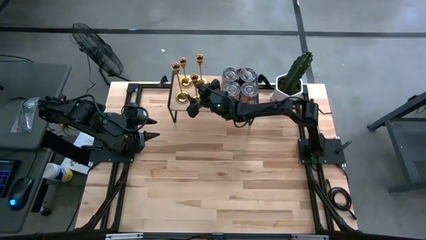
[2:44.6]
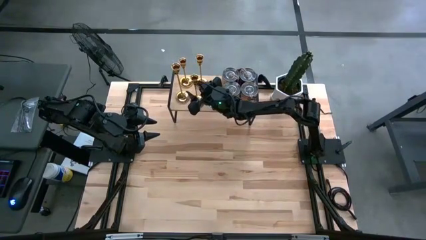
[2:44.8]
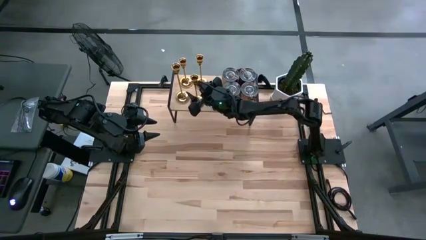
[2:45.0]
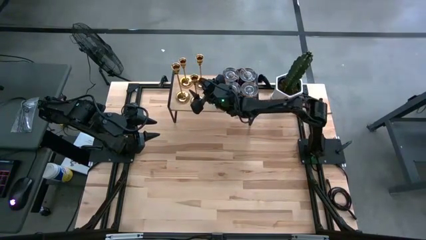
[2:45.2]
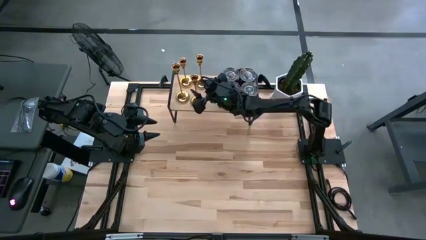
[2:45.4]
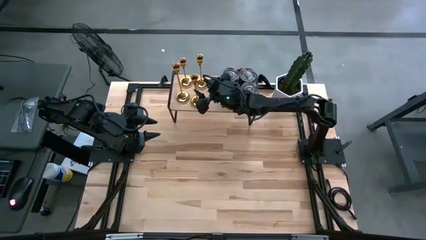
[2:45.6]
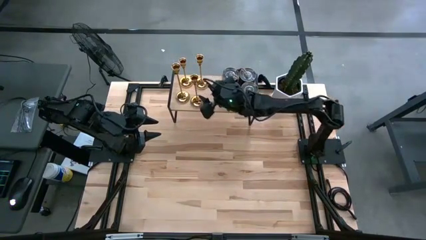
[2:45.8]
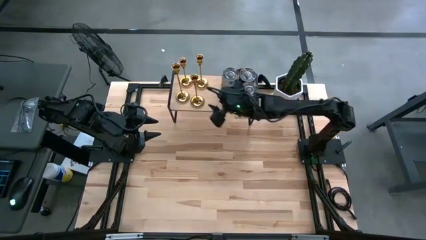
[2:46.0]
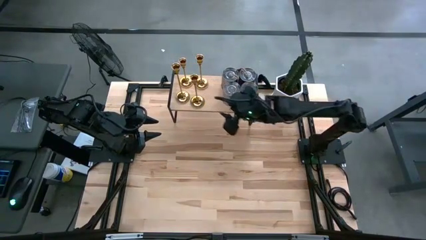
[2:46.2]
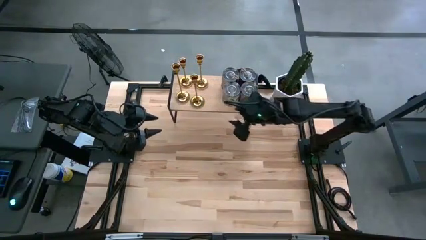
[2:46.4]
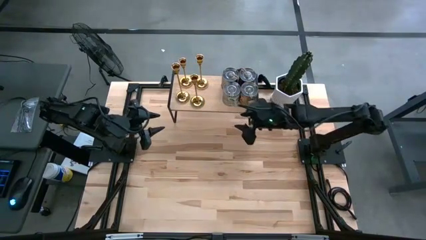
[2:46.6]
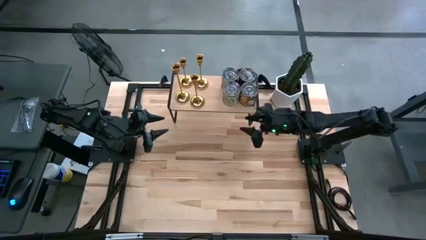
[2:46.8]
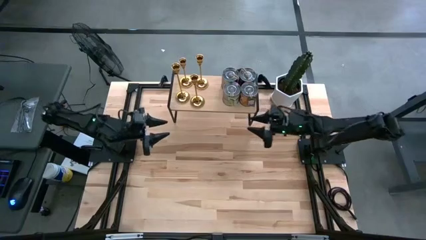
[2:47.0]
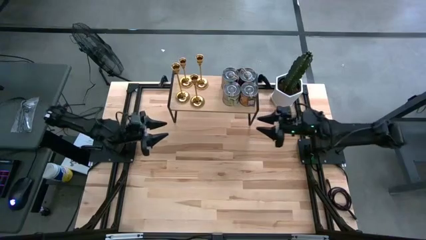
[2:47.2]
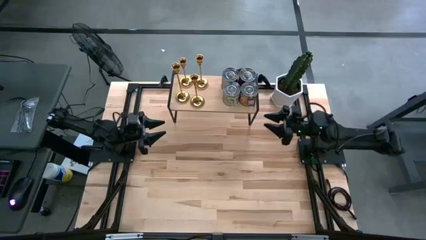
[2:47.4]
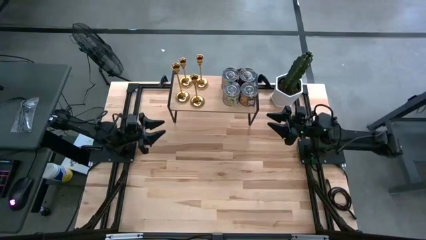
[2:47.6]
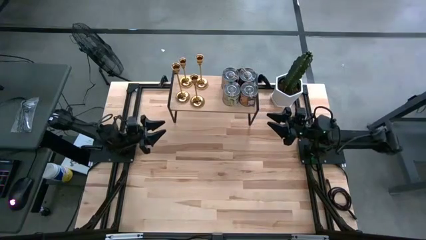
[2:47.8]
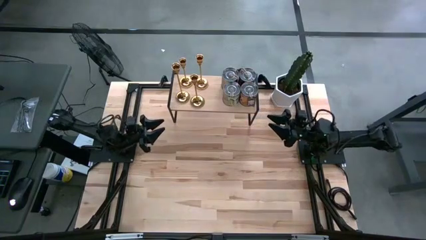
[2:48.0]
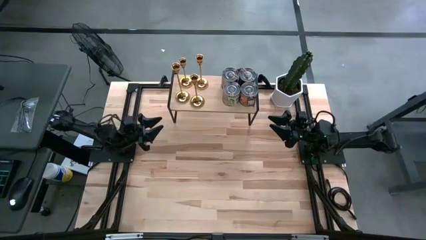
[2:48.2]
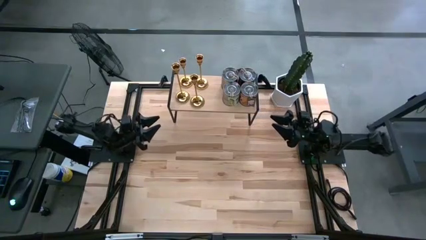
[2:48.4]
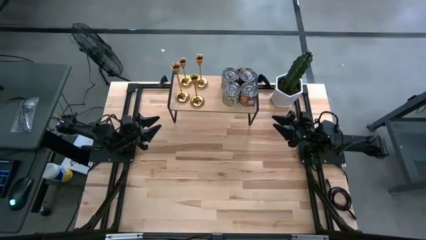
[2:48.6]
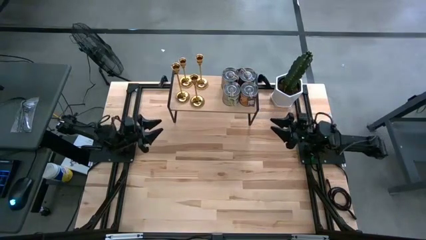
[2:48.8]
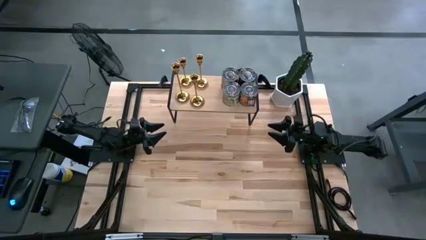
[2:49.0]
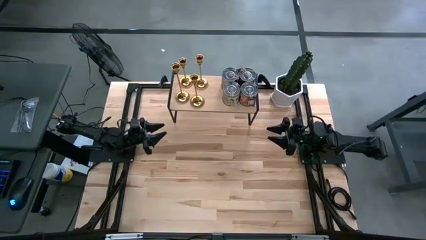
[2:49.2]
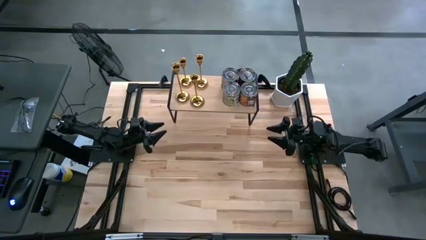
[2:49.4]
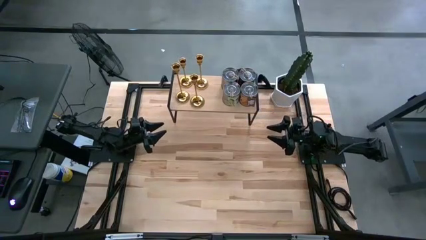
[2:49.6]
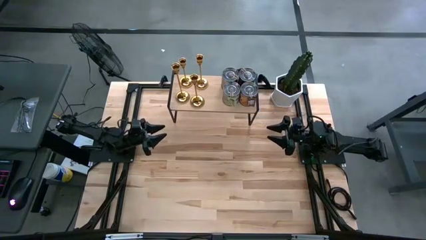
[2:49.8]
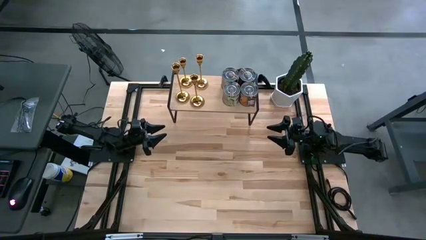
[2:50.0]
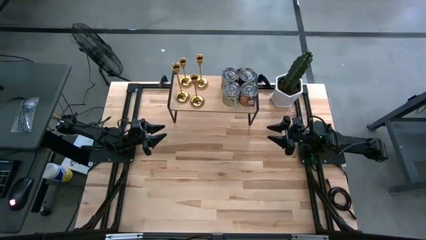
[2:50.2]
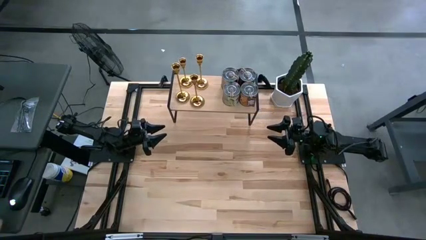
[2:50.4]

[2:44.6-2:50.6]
Task: Pick & Place candle stick holders
Return to Home Position

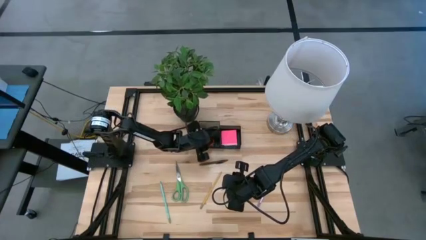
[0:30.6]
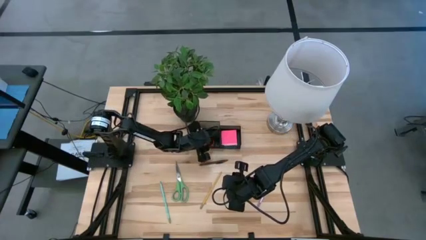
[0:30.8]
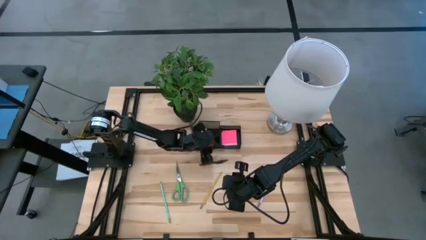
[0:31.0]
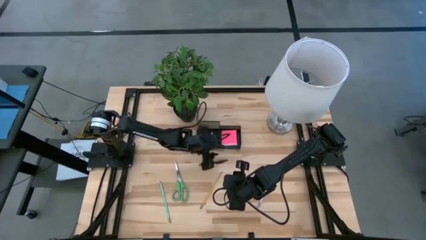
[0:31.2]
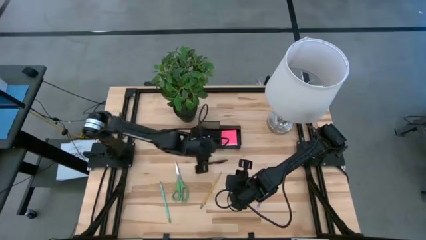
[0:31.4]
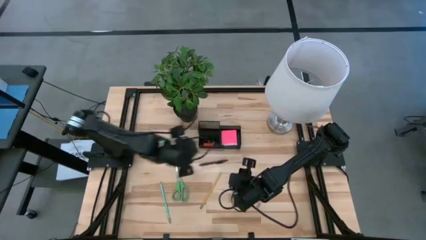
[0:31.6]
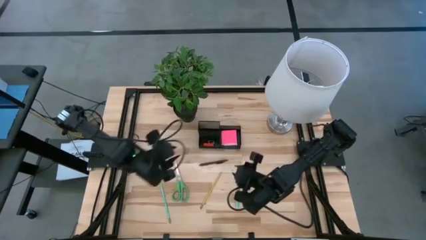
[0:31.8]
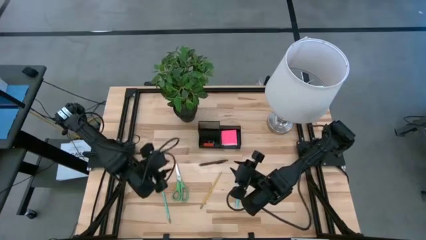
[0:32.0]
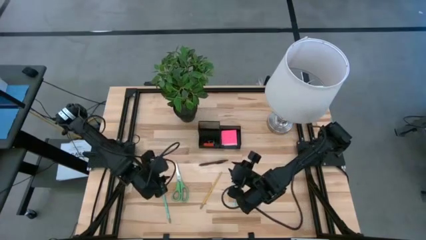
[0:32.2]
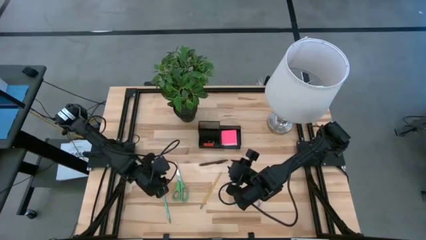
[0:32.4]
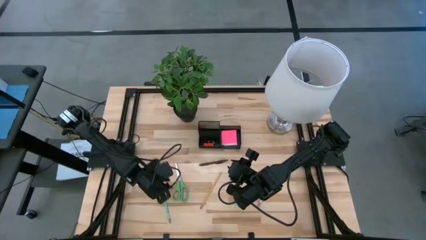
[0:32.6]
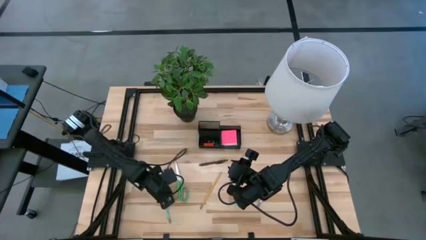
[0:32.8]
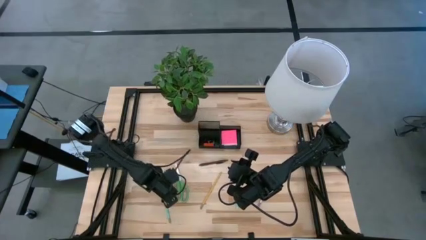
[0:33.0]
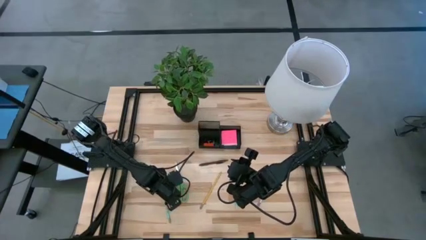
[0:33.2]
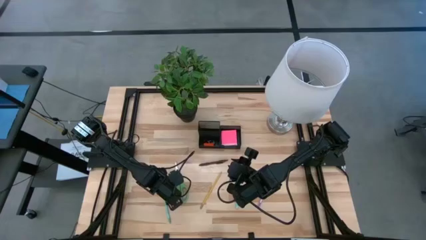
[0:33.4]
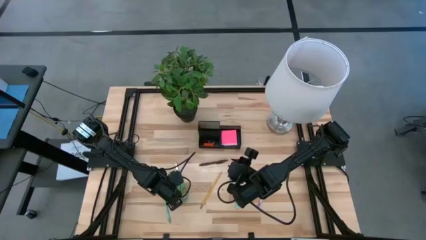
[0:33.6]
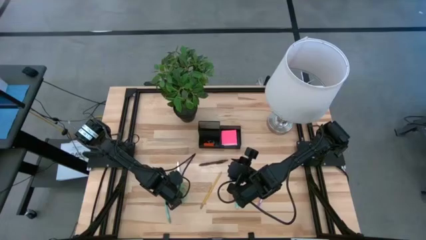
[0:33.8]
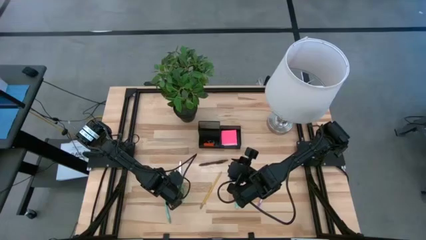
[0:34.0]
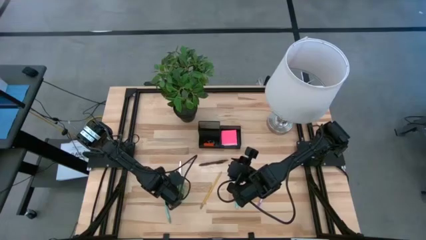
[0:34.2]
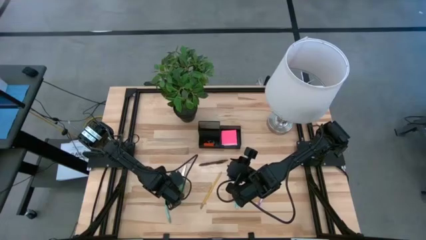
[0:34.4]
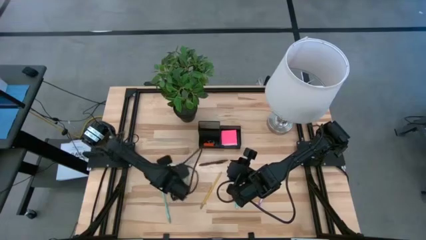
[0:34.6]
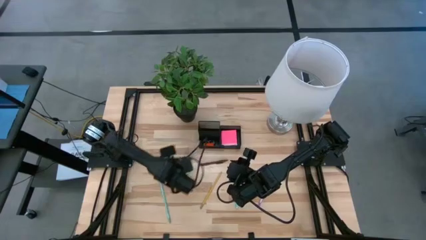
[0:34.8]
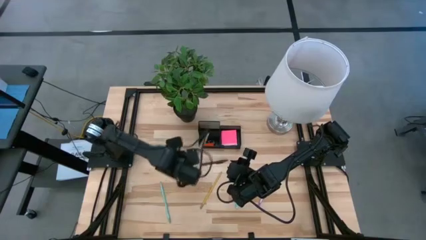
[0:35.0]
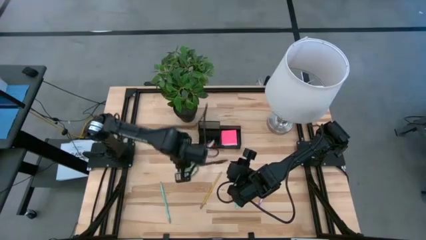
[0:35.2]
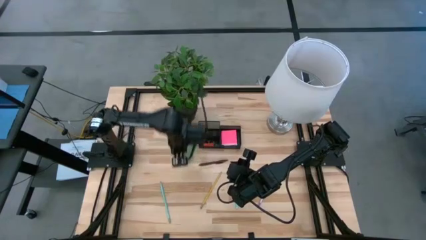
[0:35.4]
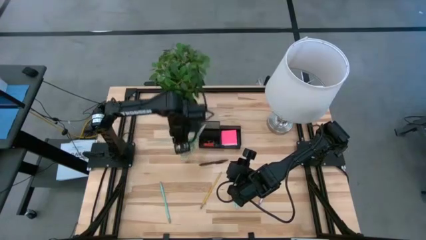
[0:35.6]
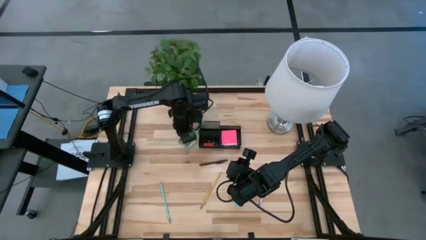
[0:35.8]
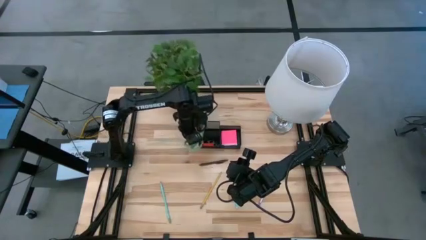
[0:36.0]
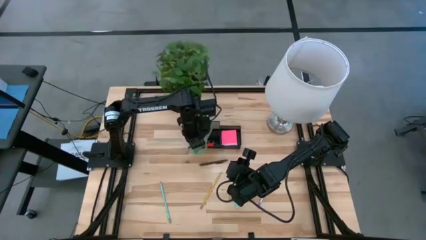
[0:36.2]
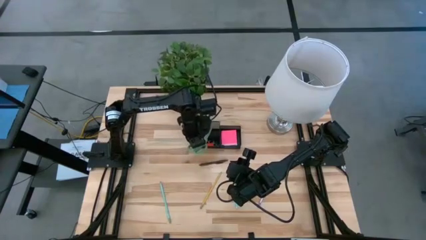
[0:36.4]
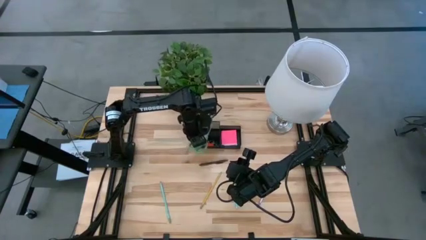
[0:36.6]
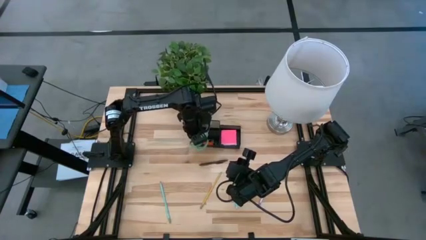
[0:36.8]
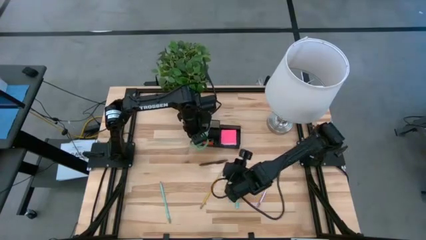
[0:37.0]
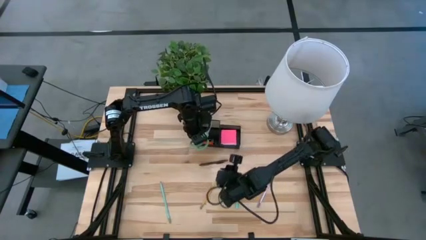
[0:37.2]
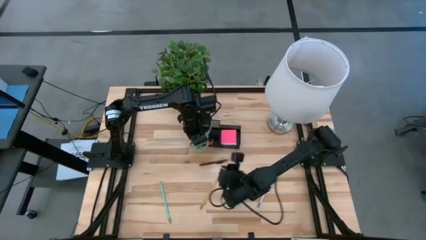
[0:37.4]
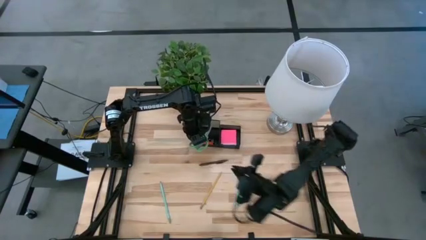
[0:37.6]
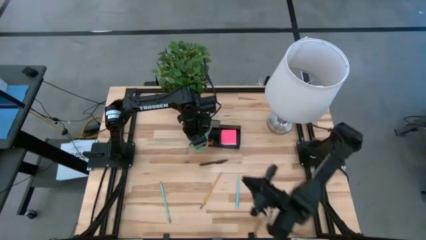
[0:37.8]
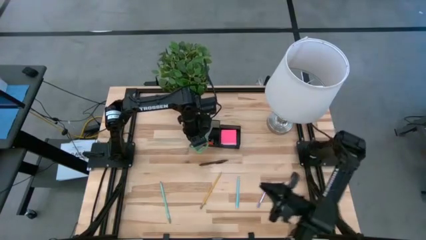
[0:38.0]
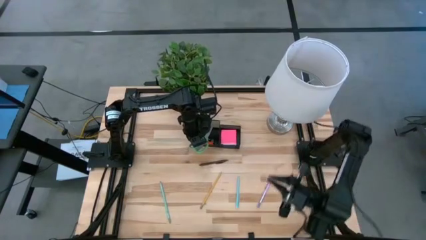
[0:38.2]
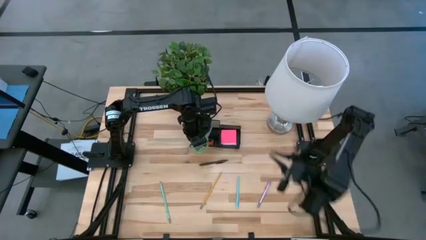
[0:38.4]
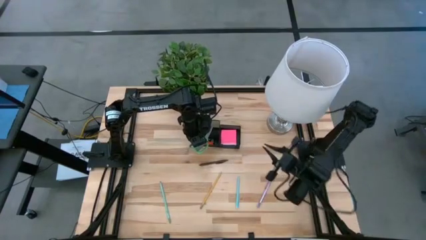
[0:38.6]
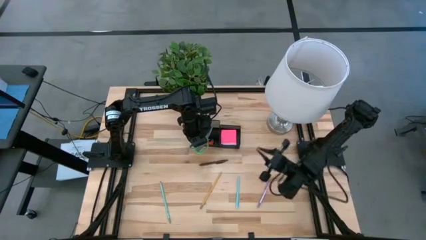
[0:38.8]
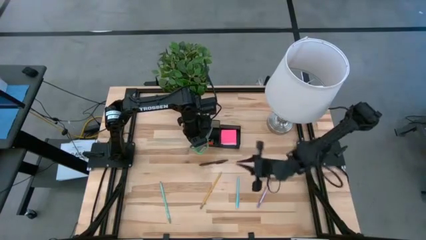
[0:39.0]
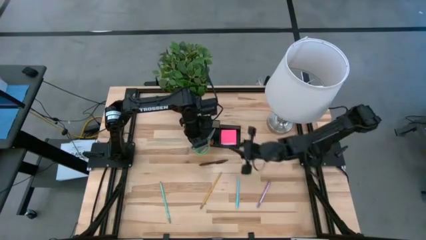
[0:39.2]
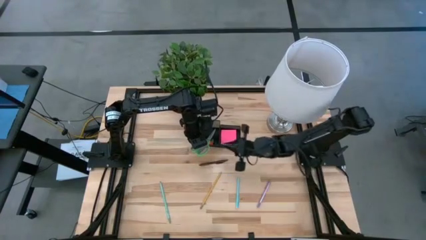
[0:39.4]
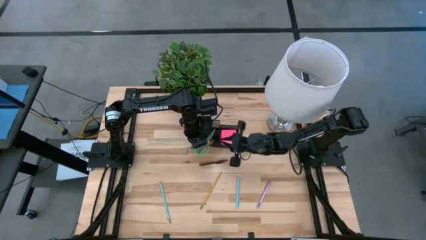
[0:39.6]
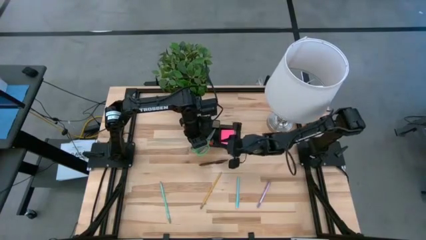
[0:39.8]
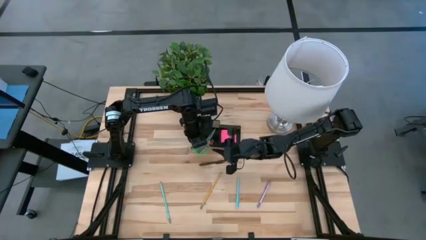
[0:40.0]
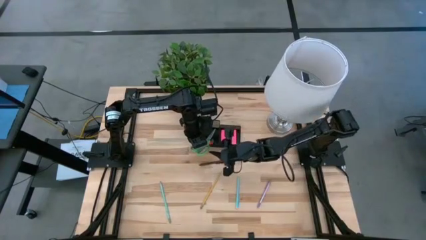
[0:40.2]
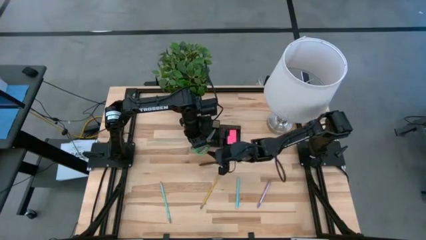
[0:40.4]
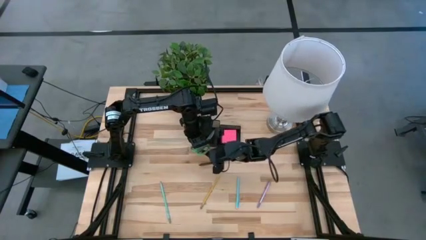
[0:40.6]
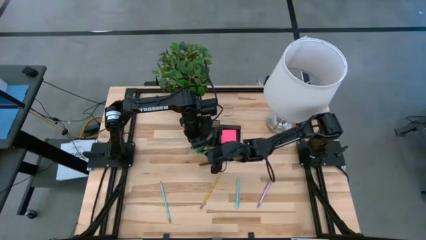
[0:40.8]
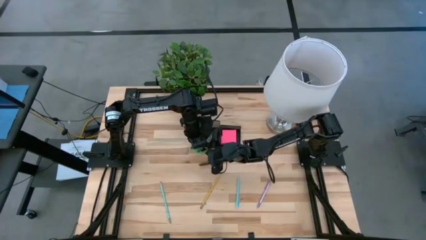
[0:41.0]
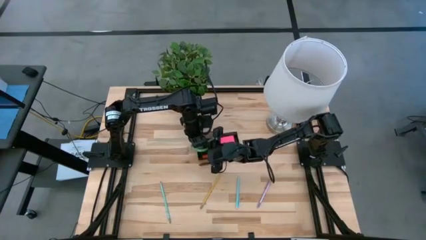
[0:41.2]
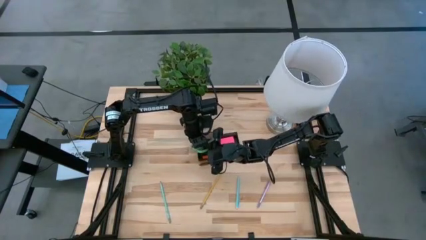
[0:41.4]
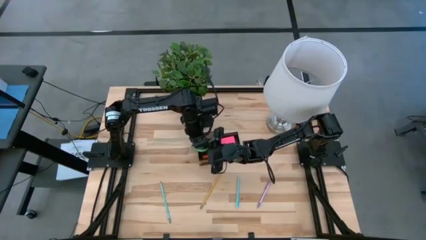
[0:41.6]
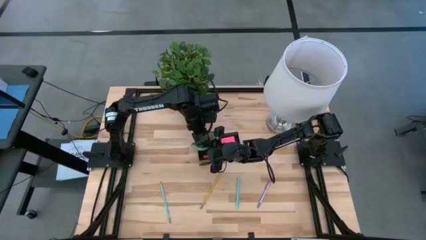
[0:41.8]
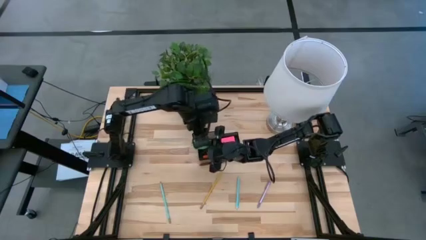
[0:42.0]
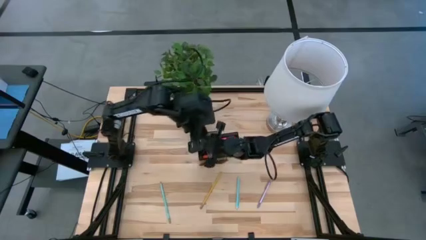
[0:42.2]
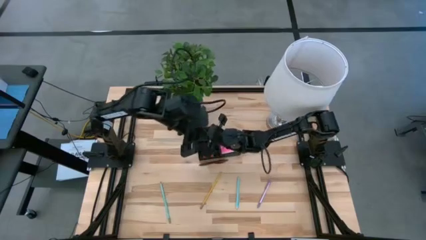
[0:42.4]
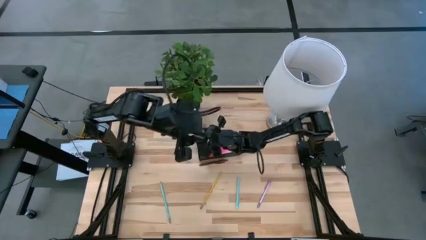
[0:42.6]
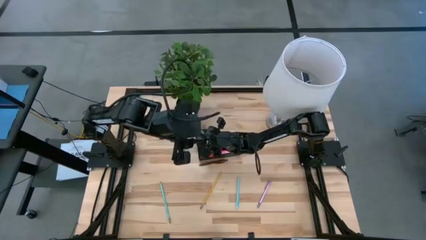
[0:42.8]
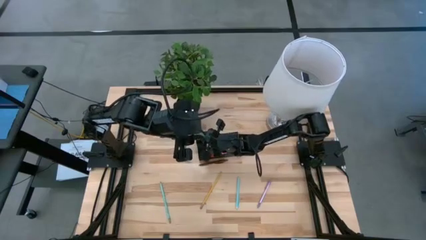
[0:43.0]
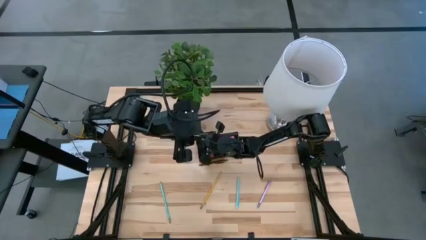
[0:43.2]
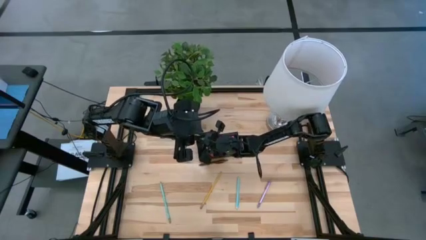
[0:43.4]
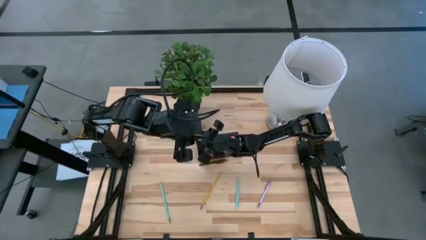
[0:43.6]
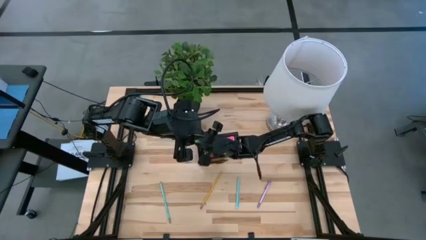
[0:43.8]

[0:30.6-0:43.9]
Task: Pick and place office supplies into organizer
Put the green scissors into the black desk organizer
